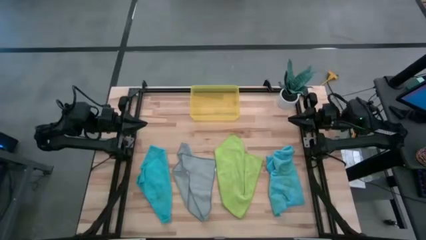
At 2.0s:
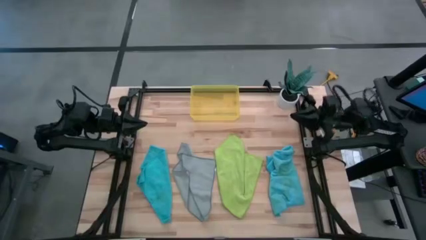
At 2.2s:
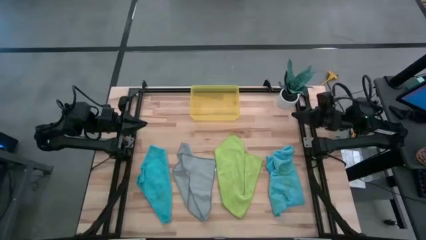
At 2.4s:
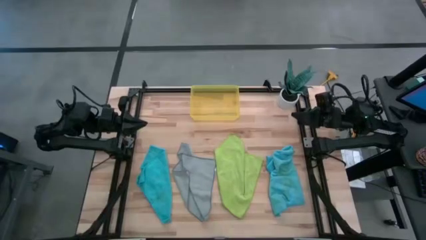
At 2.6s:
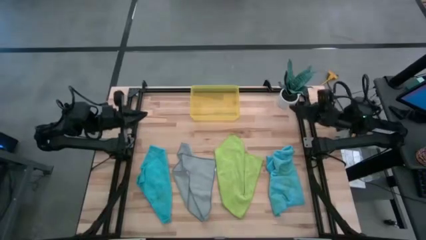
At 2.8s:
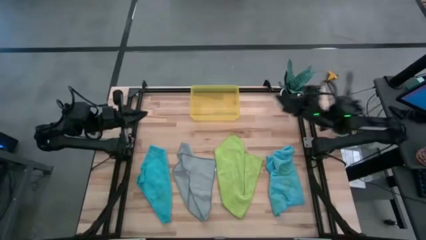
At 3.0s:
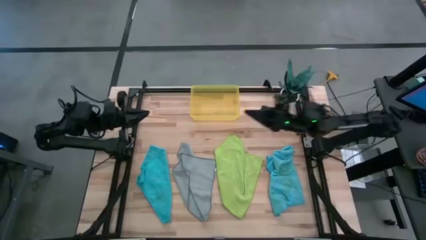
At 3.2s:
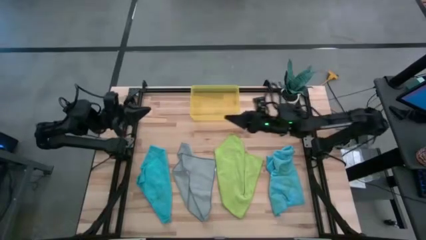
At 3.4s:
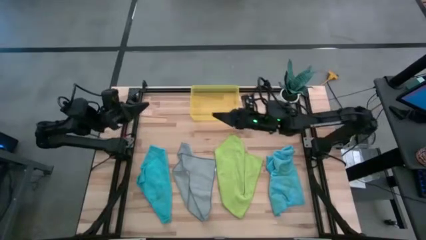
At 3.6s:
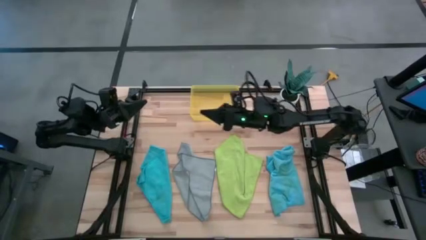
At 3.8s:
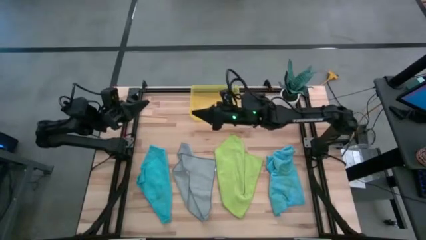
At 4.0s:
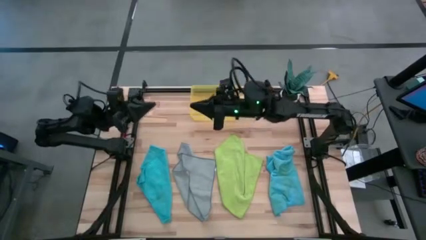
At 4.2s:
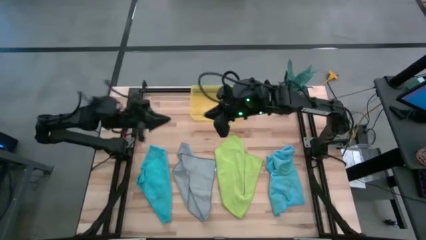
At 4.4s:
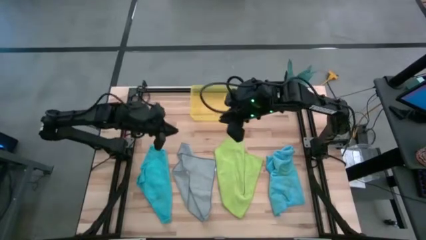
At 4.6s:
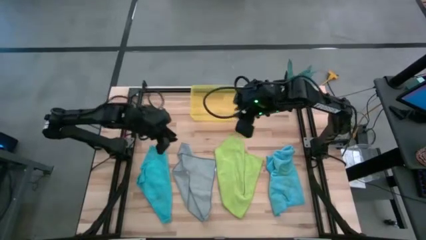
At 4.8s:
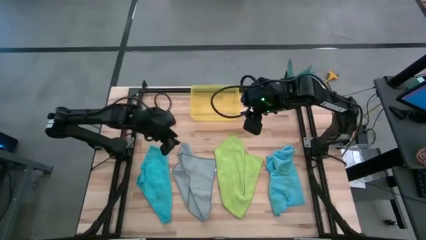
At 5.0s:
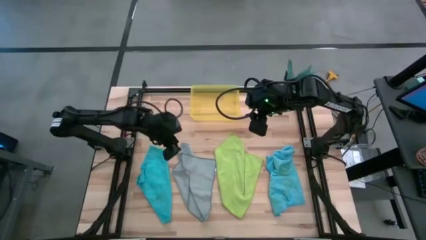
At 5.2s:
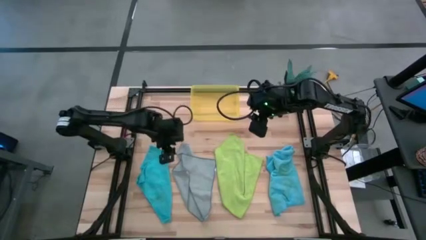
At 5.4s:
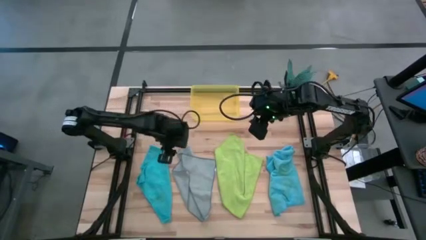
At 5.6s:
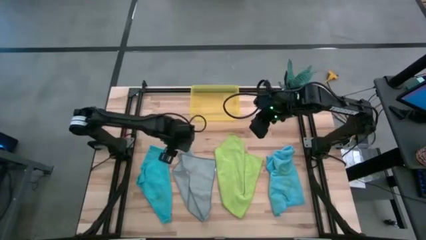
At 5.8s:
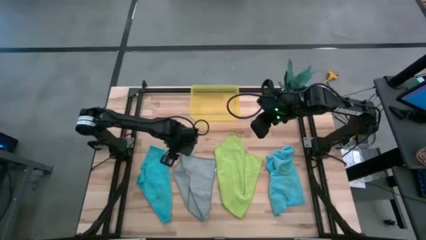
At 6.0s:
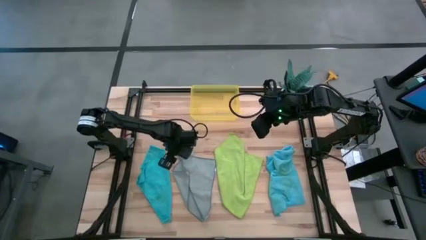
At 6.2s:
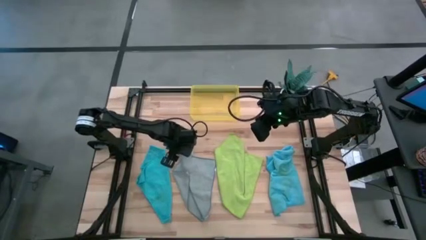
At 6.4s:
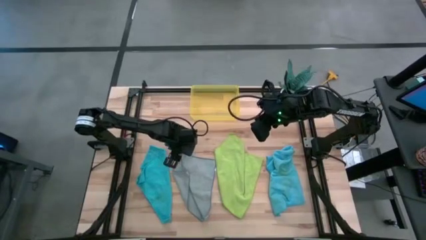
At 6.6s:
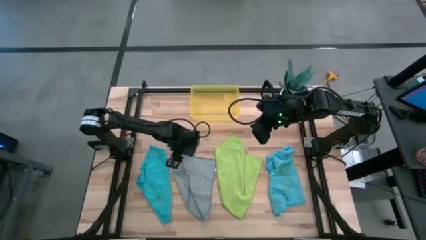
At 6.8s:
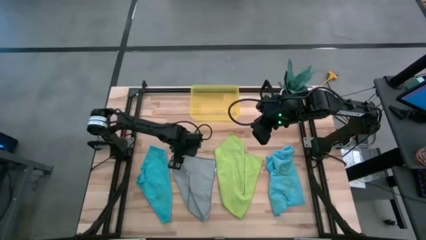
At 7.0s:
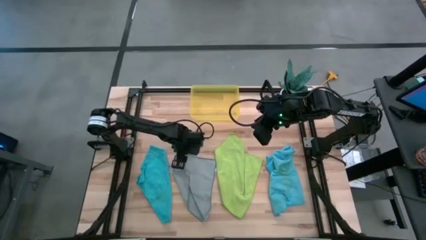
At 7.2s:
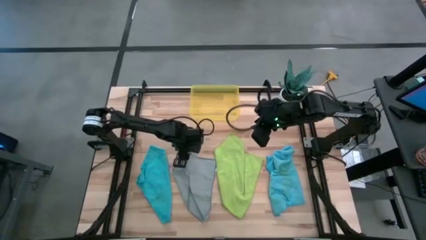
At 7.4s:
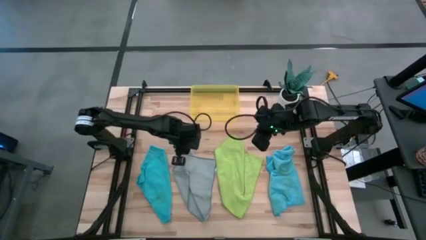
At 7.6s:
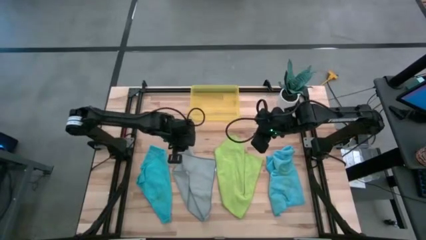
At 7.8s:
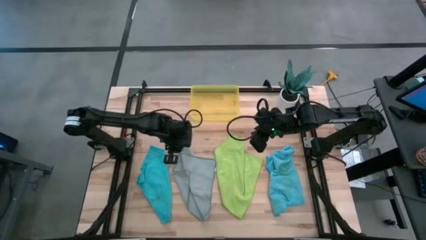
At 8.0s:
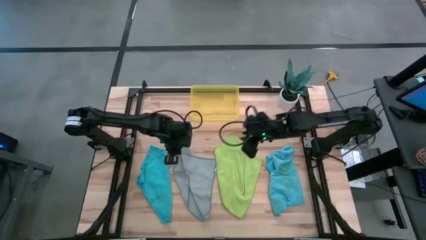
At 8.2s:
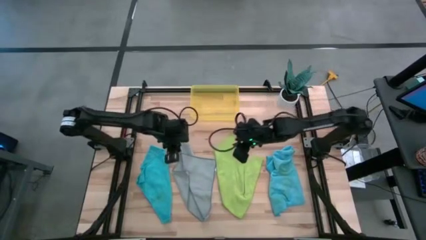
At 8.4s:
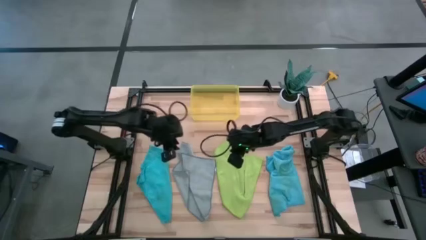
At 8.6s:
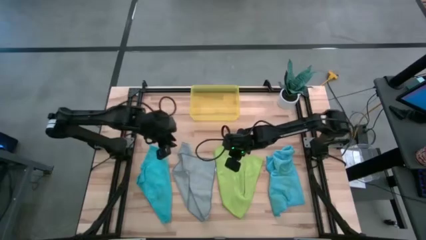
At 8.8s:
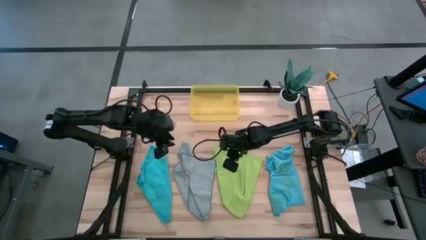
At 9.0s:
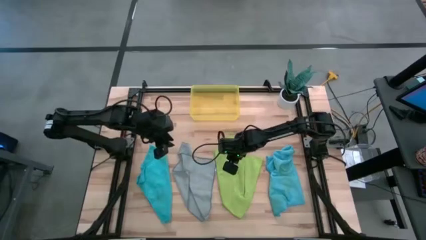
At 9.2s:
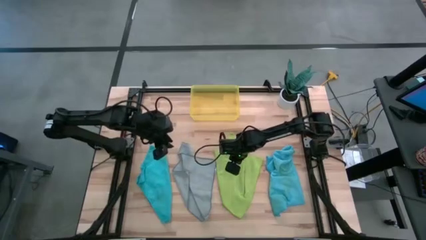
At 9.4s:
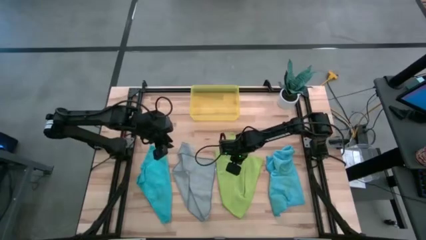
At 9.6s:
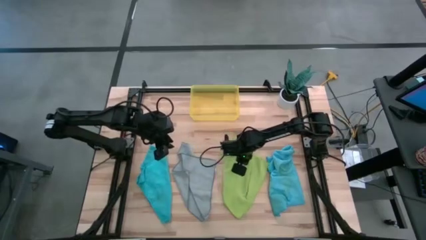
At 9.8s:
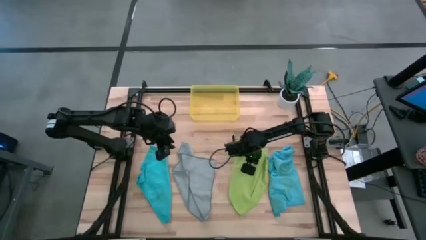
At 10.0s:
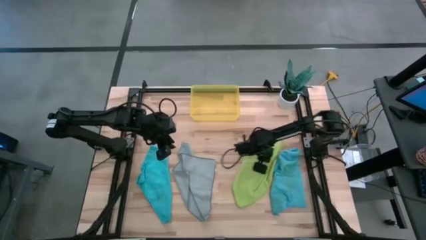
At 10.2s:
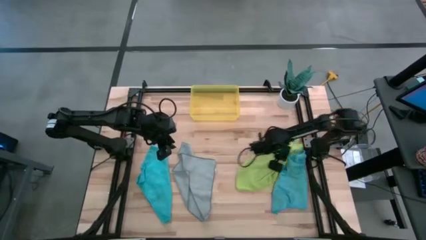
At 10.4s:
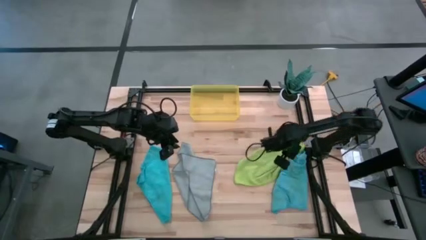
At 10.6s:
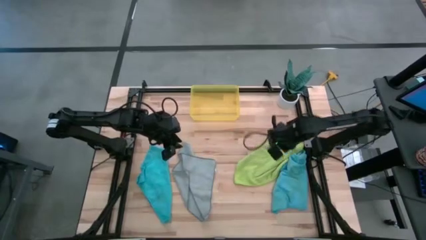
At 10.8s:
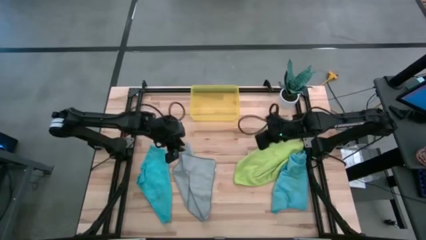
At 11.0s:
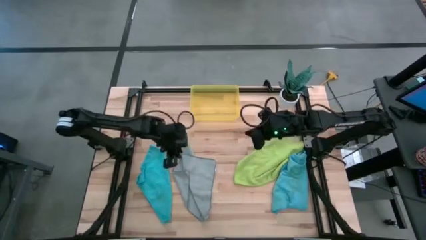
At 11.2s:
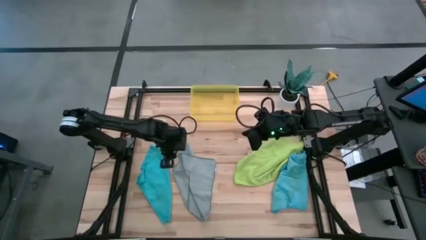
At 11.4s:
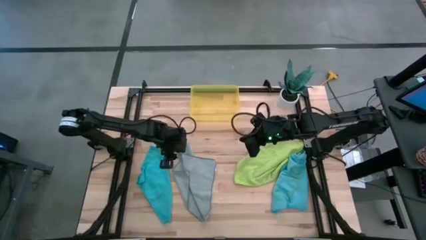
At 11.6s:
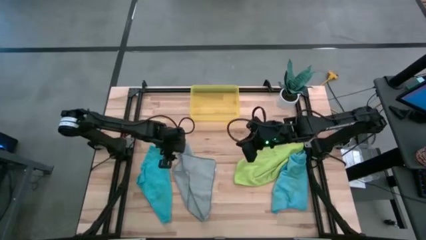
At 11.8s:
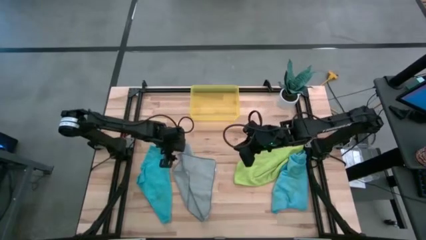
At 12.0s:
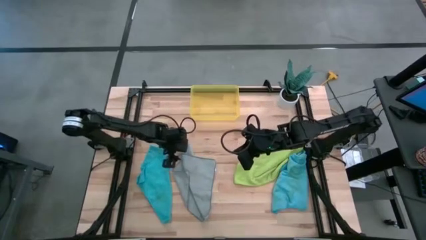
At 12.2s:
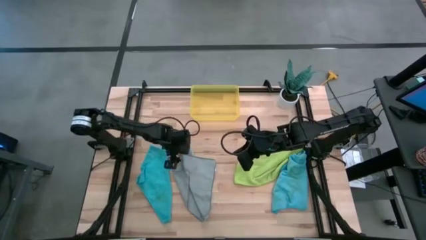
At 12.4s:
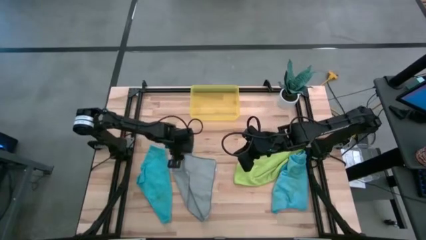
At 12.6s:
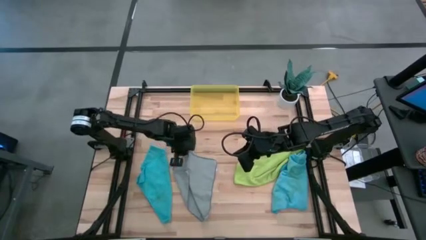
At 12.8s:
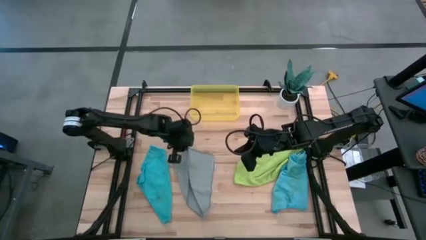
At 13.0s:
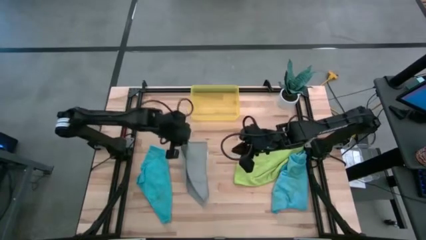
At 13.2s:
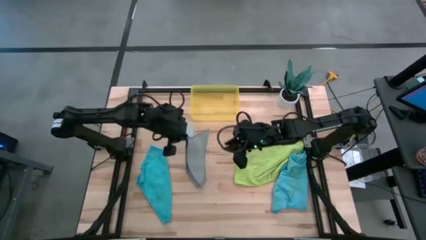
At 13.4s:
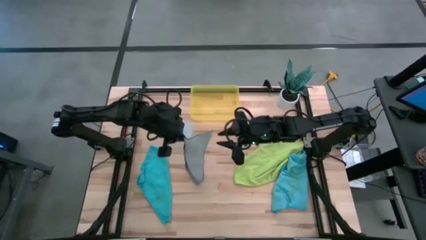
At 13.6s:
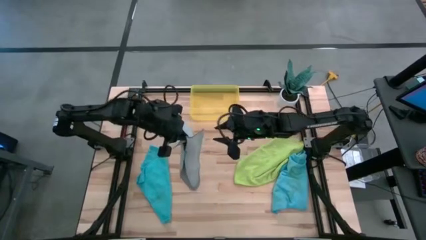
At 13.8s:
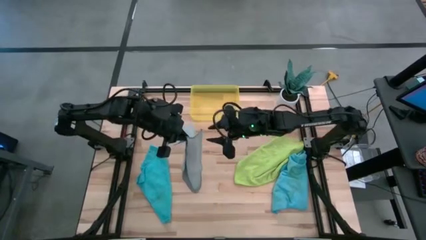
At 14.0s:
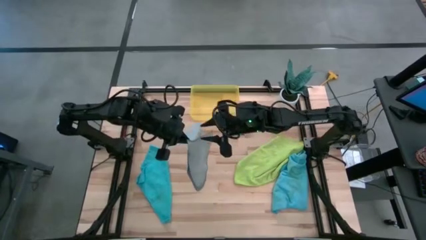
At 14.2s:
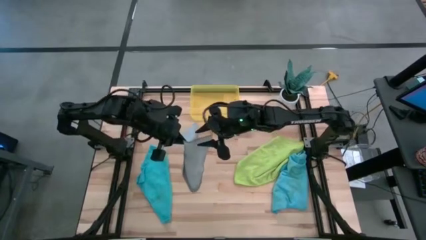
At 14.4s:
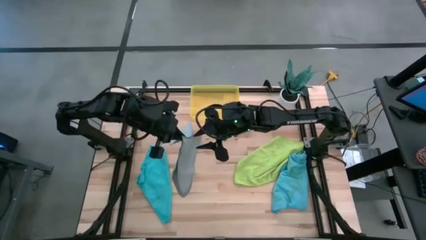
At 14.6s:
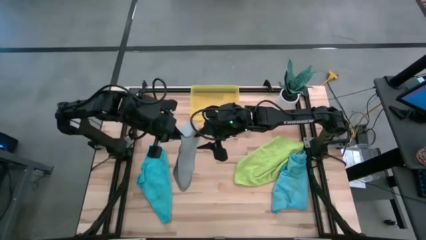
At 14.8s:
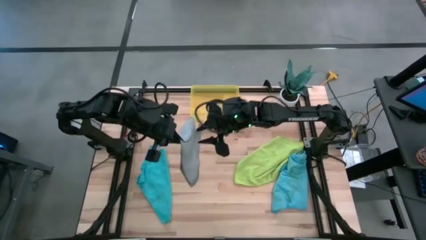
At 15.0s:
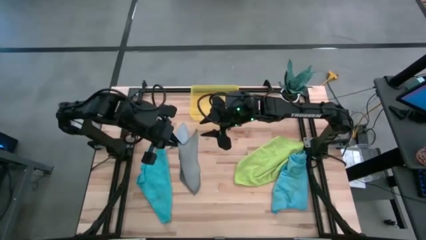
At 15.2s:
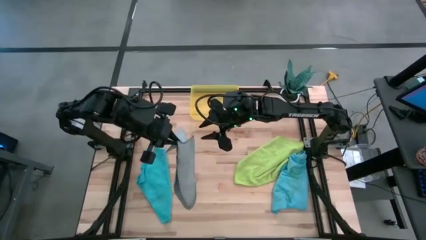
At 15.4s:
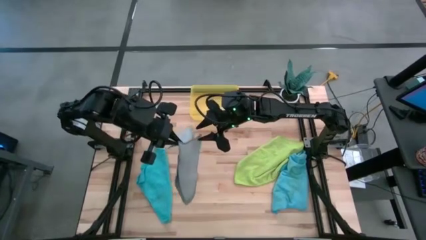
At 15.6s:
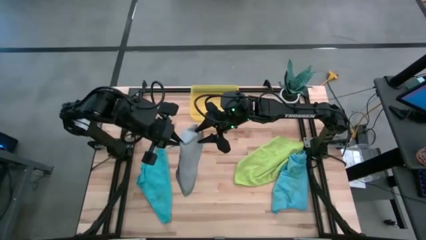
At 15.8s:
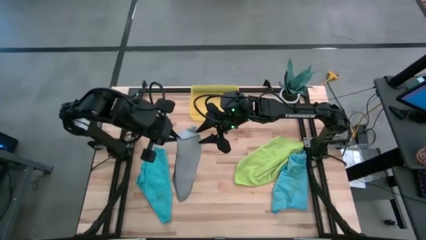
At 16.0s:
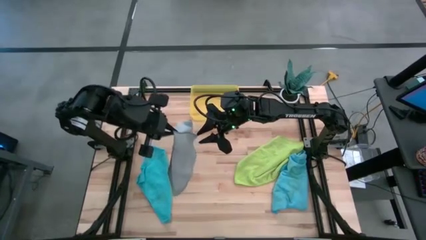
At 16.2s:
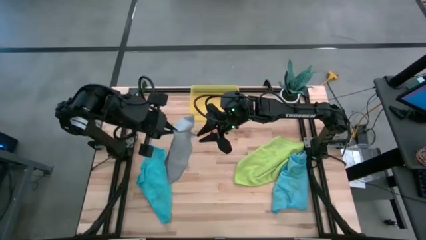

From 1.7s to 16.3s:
Task: Fold microfiber towels
Fold the gray microfiber cloth
